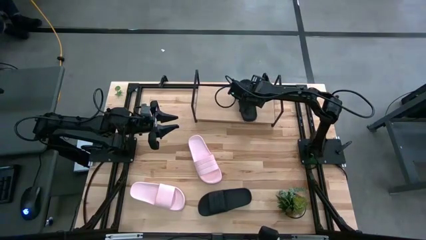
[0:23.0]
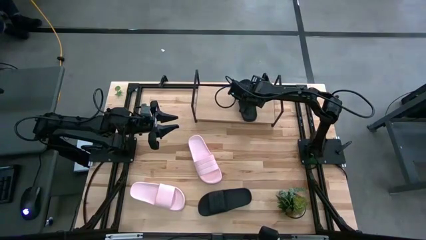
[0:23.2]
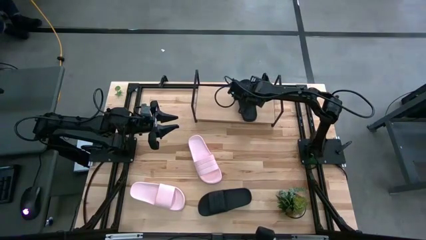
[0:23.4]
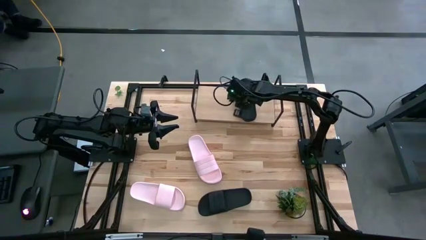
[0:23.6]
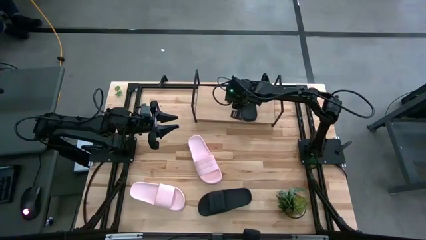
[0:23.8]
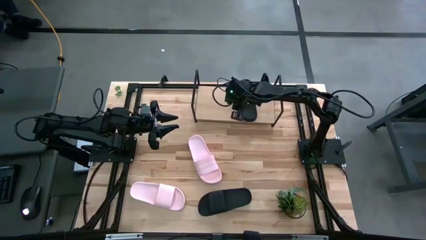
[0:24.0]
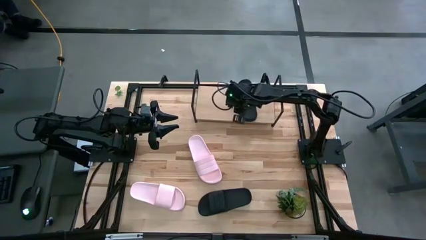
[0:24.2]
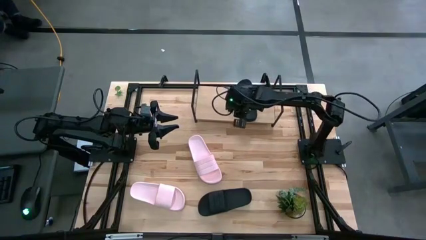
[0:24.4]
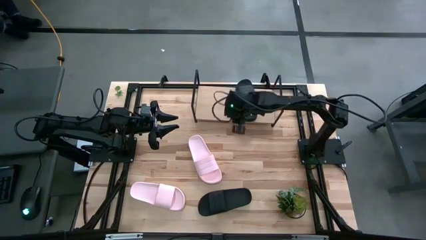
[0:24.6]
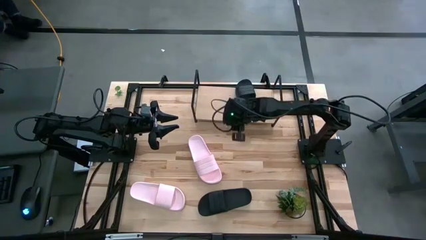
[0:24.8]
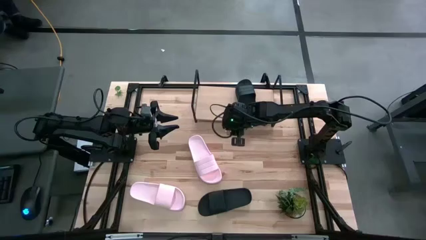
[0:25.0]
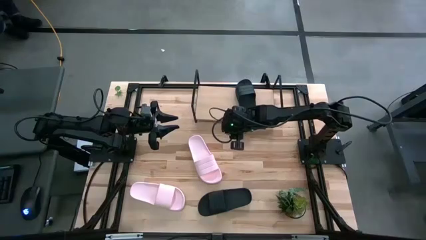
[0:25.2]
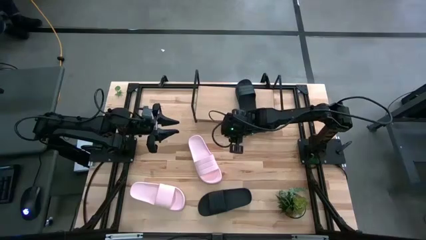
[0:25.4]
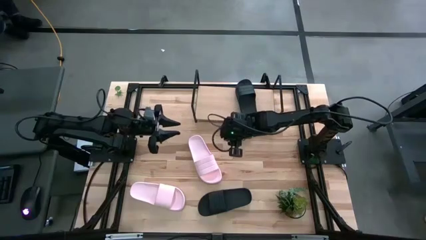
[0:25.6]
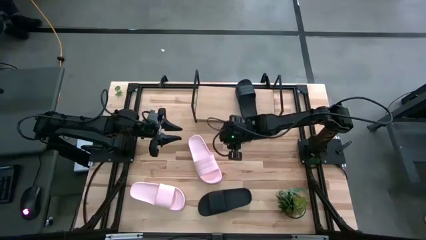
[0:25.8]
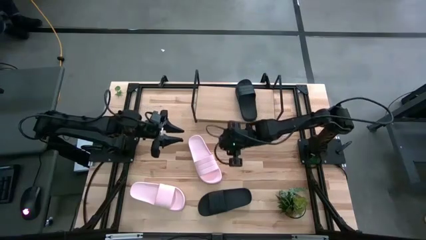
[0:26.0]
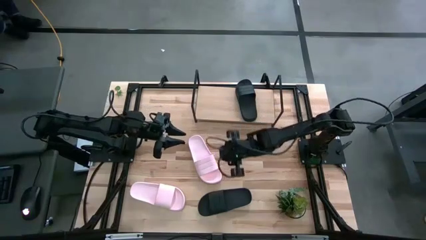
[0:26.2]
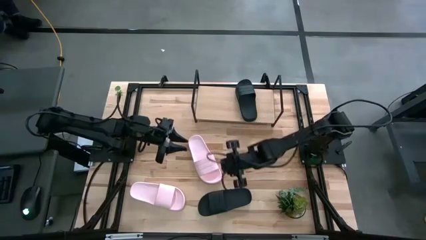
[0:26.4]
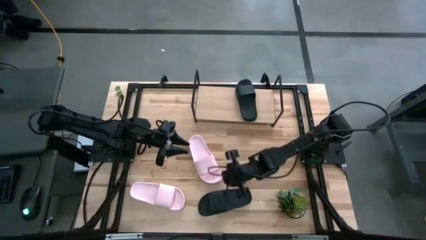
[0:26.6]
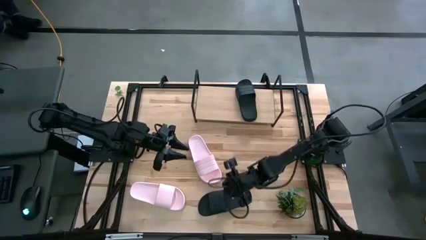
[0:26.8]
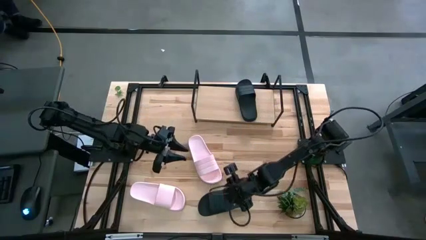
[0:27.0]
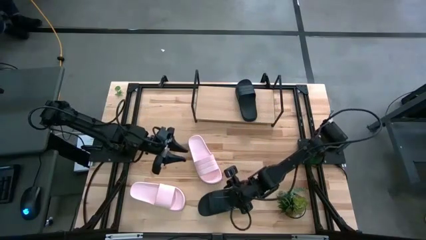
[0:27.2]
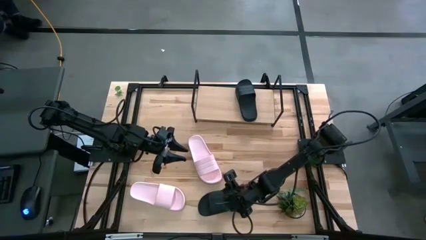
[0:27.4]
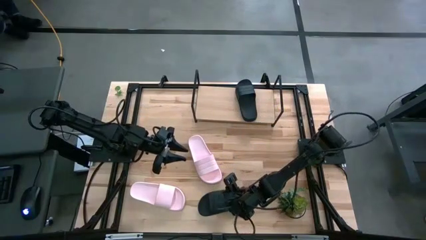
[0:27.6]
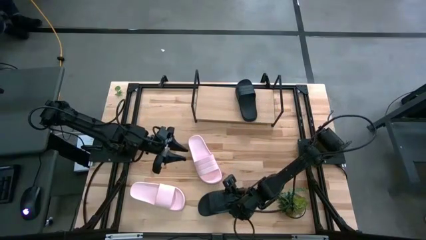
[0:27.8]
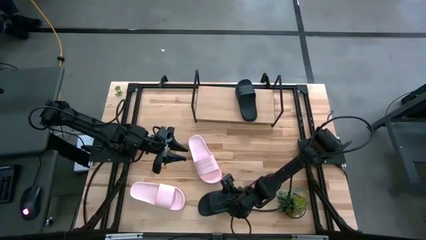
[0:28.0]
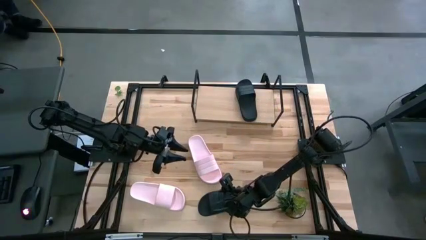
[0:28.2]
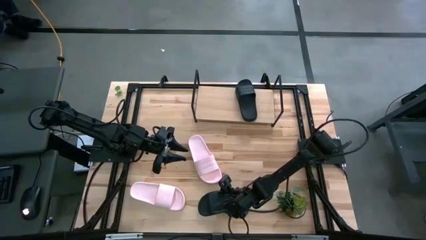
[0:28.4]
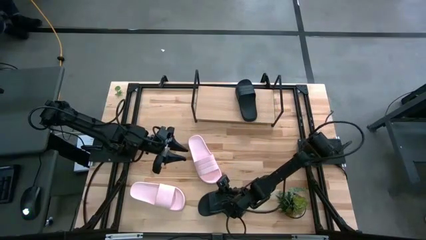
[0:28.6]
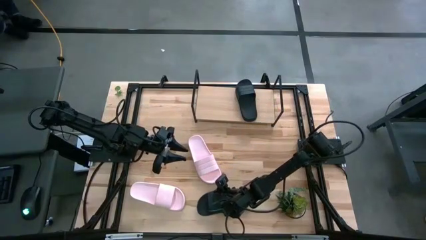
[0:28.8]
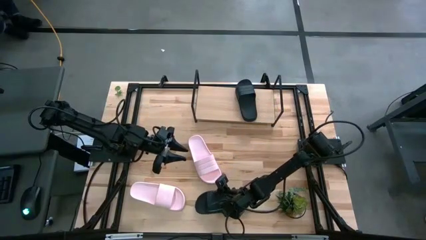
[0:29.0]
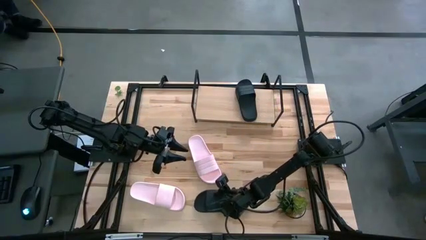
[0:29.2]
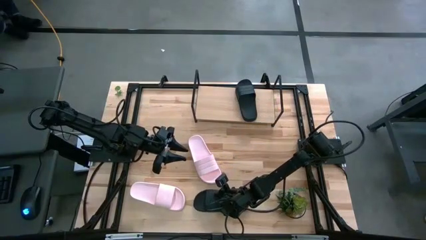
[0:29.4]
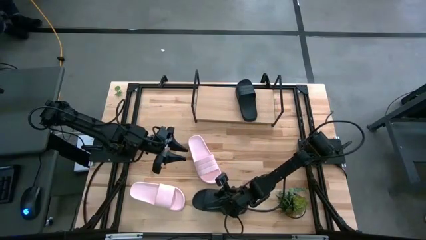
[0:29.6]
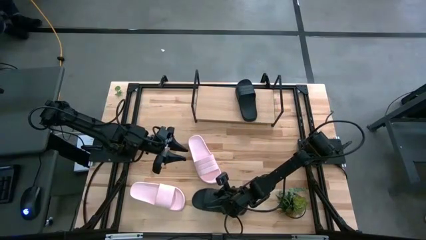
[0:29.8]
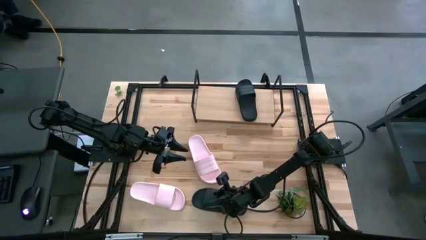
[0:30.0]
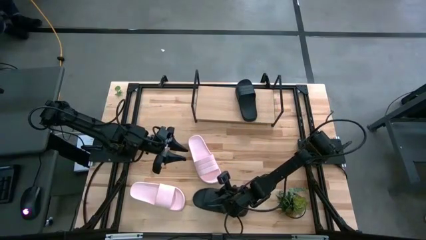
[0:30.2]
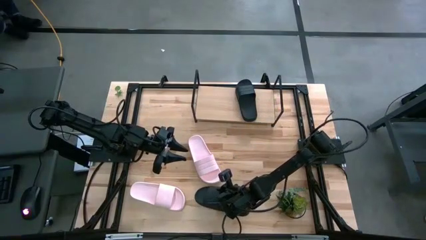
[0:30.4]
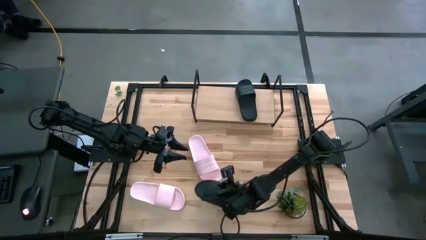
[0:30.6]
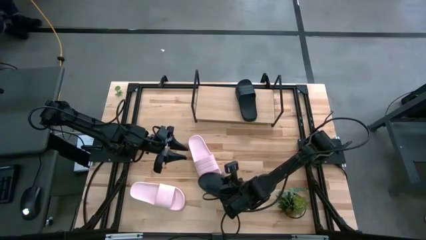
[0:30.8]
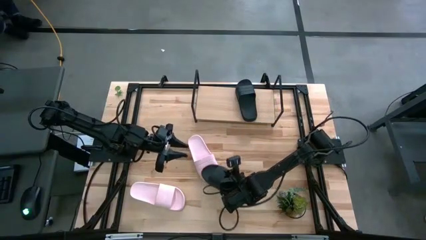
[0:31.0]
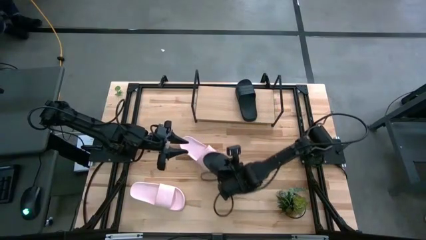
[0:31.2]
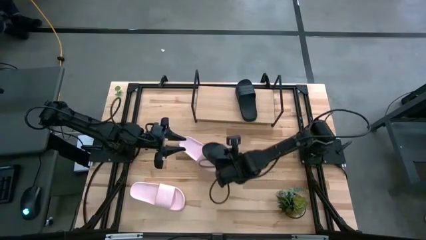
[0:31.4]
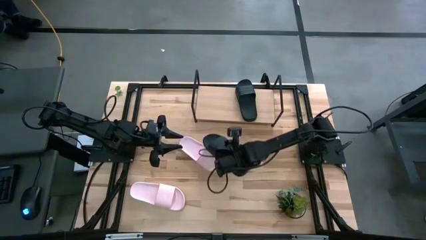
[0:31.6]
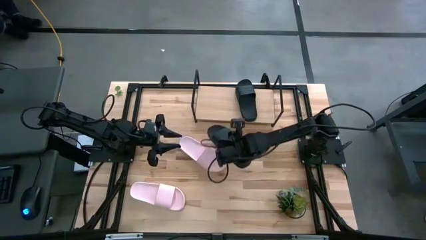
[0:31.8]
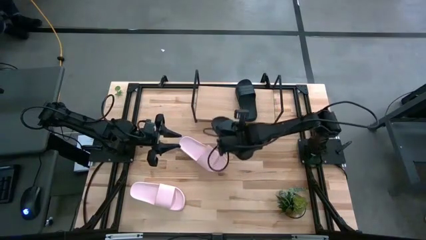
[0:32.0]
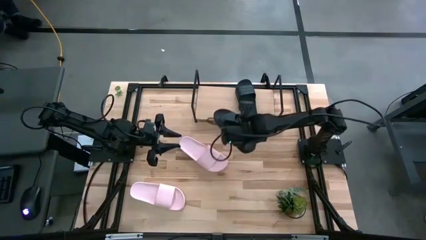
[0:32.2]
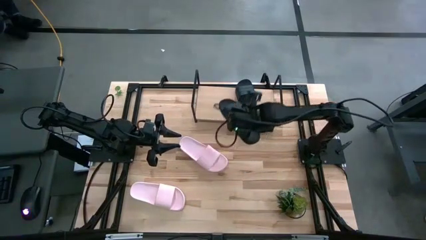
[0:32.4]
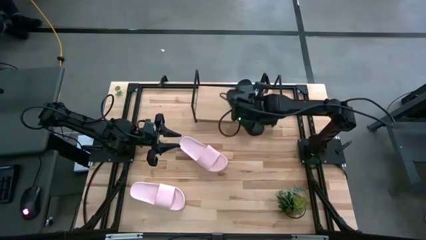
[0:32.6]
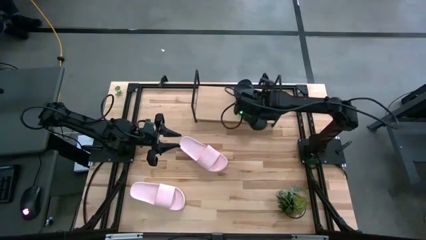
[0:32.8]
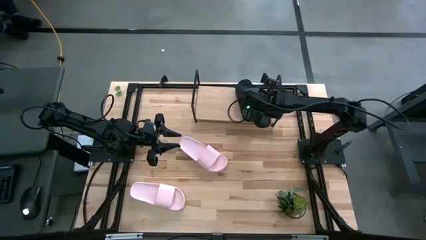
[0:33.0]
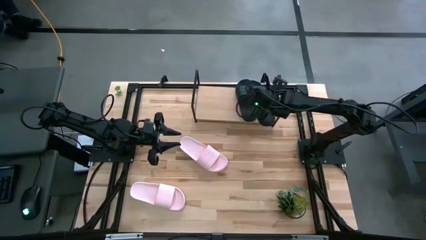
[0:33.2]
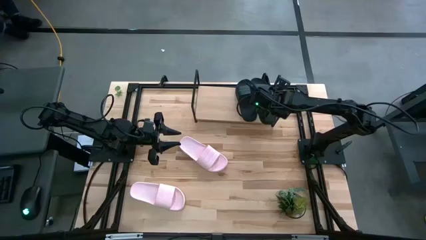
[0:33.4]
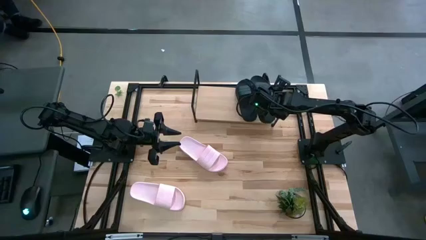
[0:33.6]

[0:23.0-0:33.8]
Task: Pick and place slides into the shelf
Put the black slides on the shelf

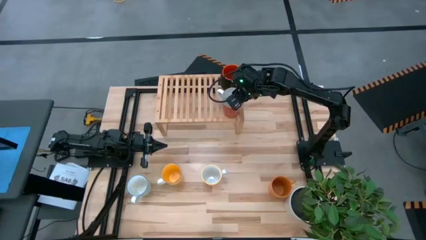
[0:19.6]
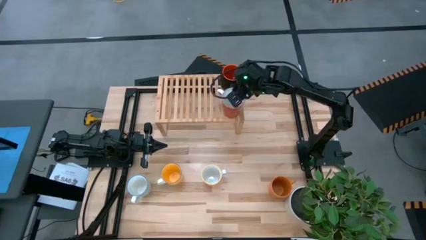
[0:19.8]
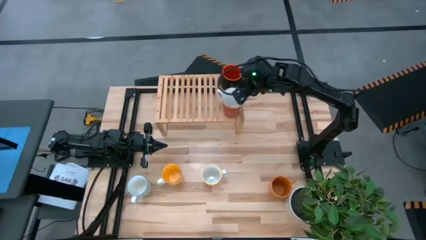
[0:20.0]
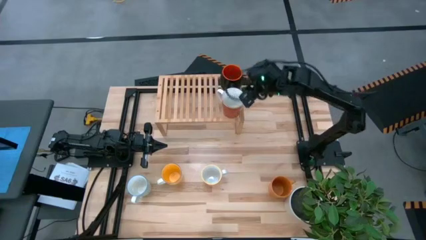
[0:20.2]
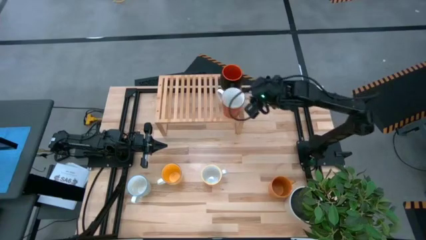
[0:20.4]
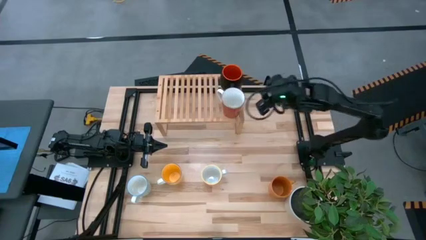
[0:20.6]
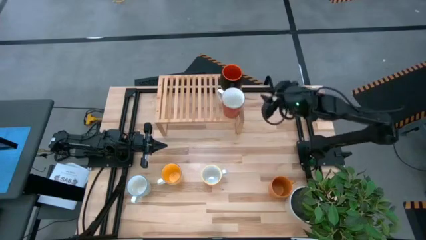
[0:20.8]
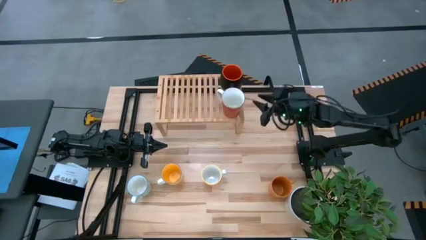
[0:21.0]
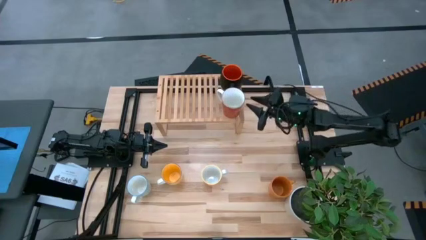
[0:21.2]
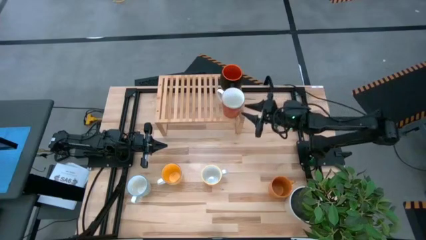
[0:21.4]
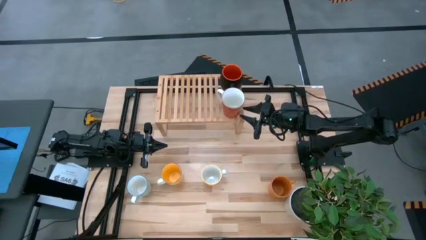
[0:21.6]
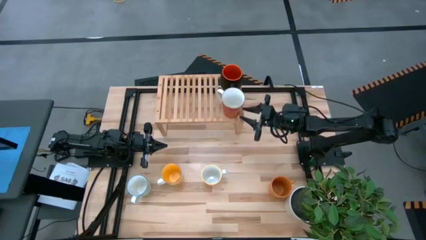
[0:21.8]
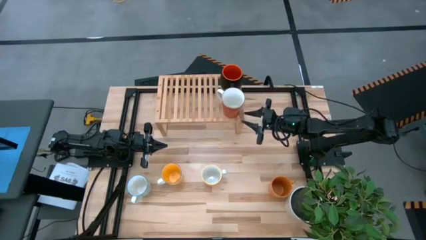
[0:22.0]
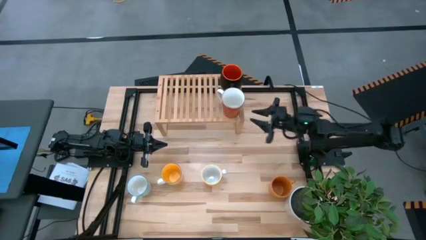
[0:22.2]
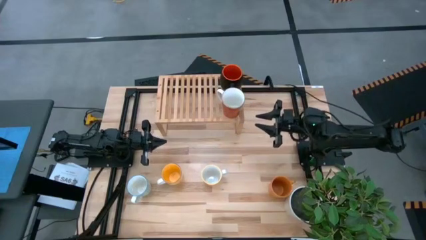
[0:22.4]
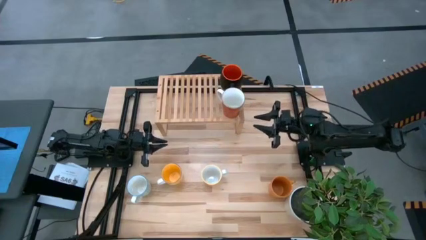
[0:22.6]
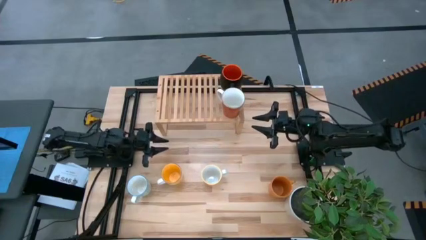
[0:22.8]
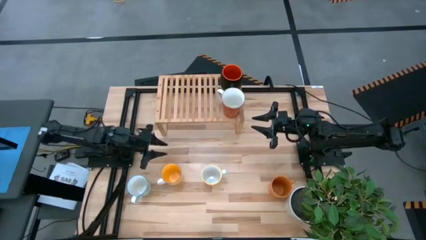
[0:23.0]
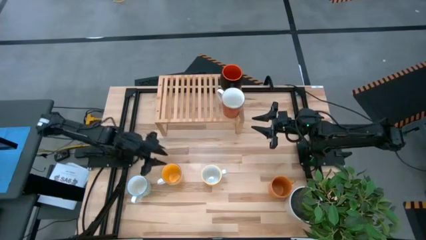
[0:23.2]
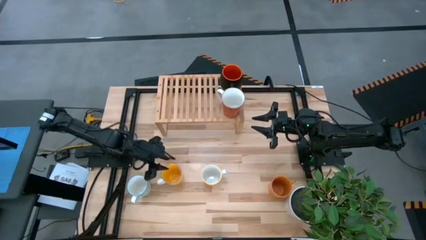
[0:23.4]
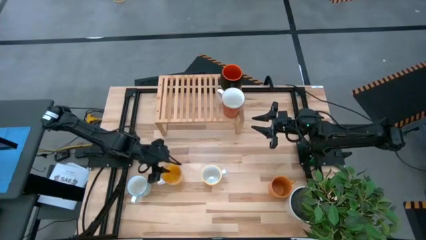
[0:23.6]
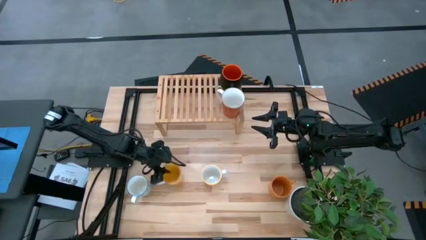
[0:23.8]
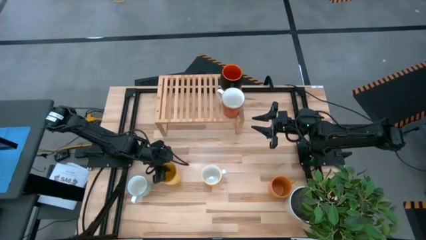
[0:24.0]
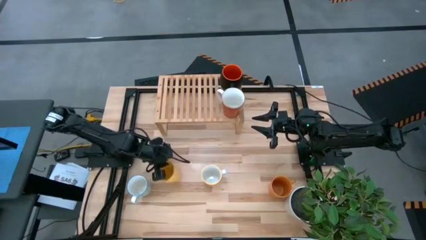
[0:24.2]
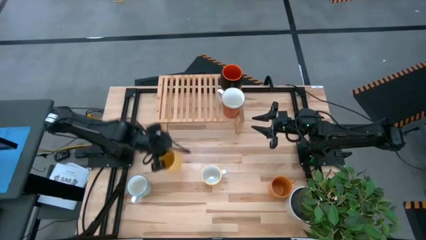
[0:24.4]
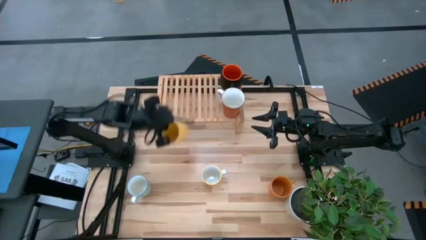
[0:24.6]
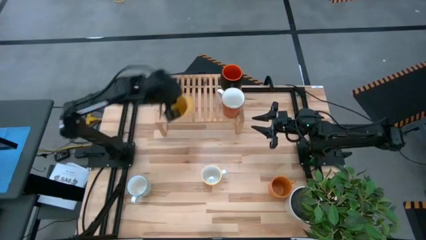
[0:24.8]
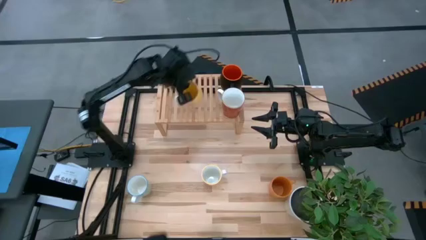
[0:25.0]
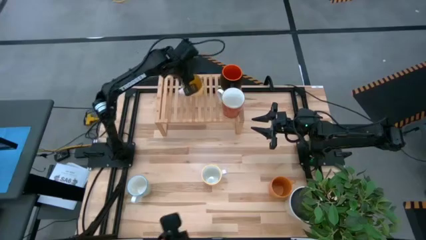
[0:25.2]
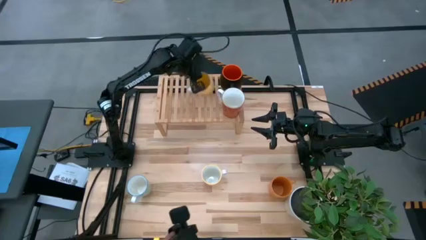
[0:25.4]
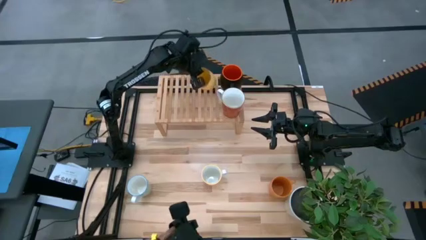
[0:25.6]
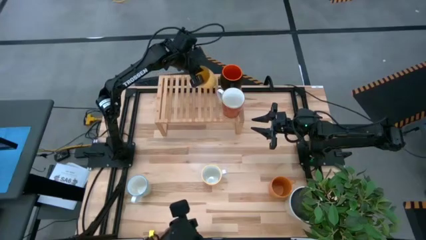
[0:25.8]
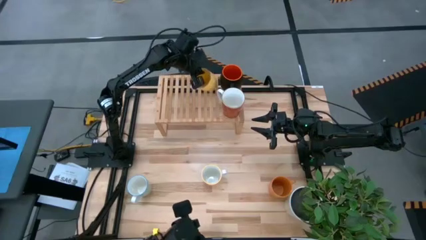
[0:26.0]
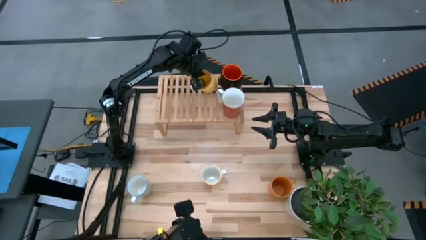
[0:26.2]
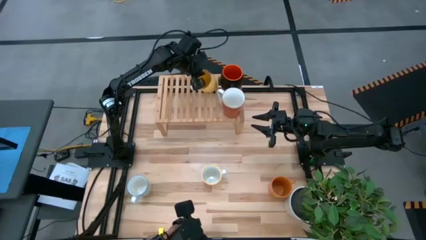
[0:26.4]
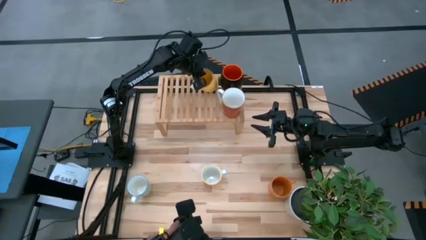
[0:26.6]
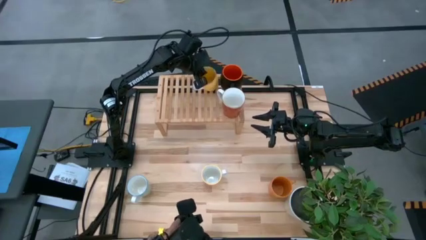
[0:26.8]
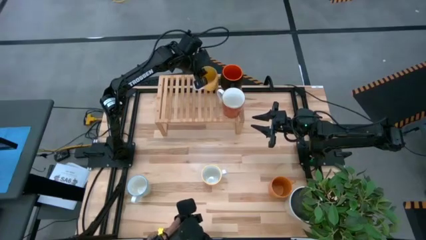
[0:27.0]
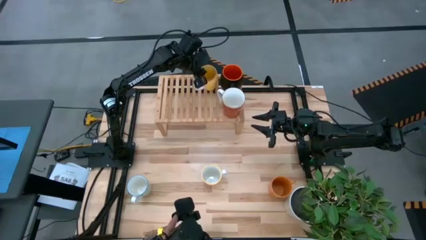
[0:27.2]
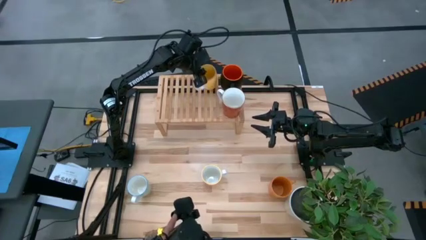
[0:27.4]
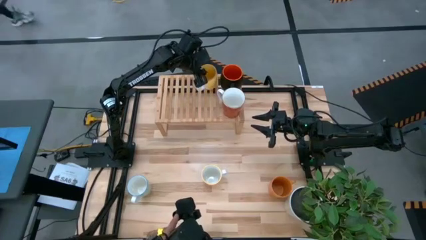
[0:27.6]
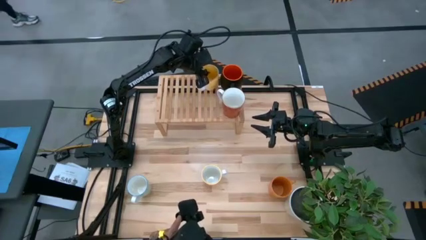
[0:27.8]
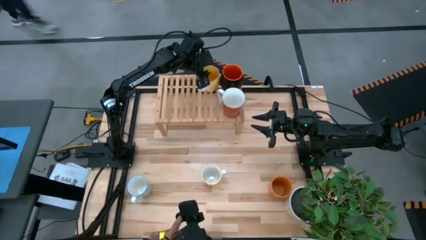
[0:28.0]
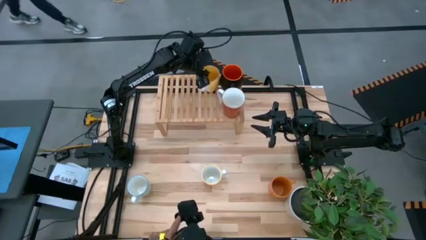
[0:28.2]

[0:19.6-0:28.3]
Task: Place coffee mugs
Put the yellow mug on the shelf
